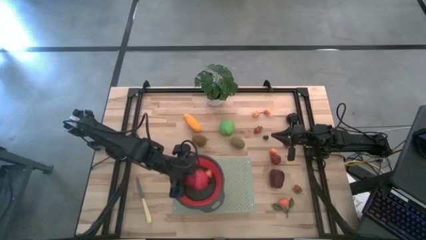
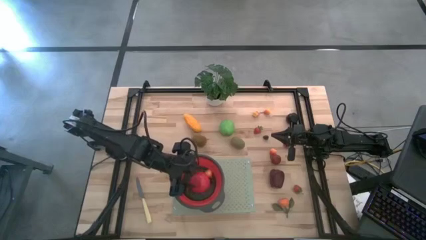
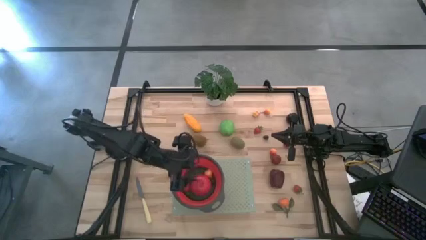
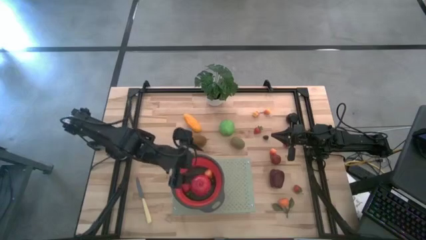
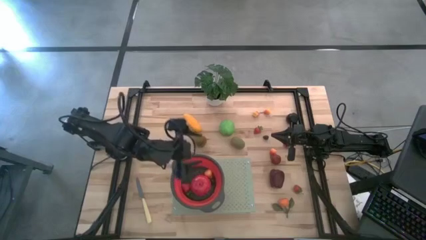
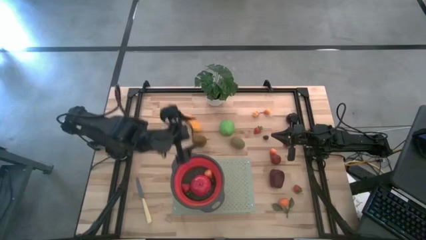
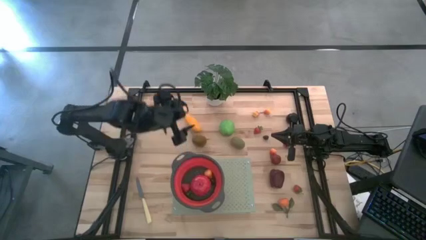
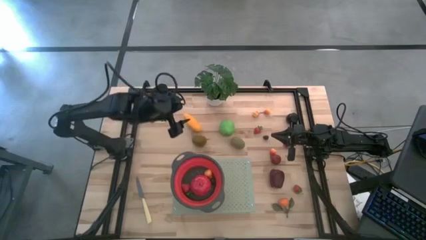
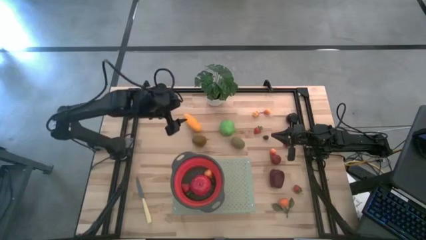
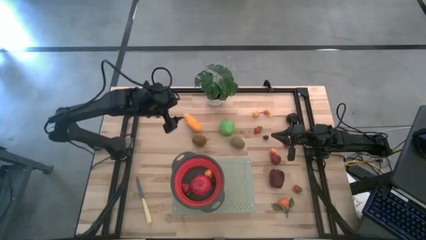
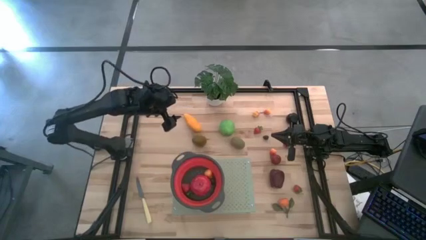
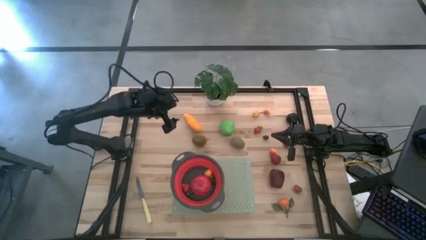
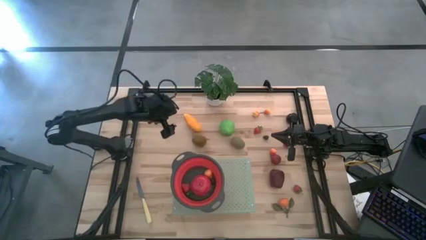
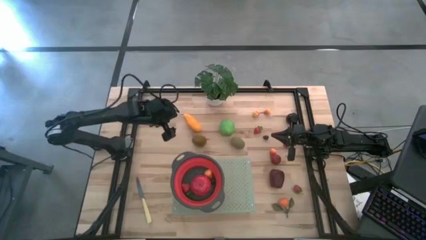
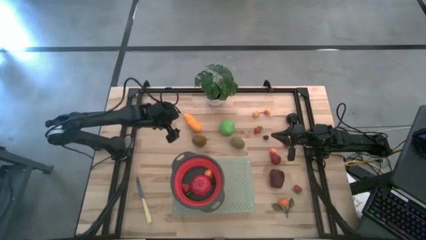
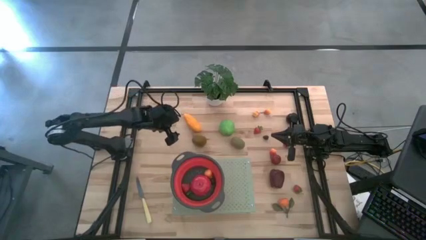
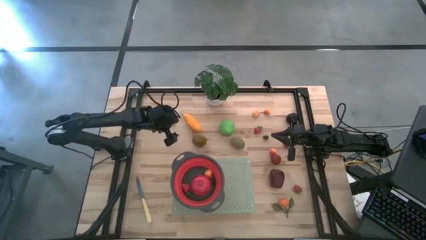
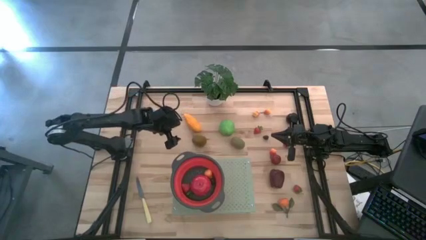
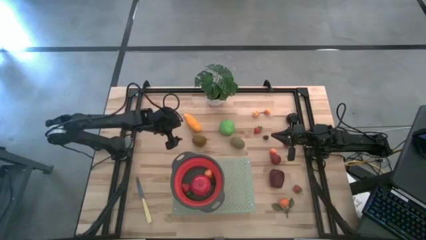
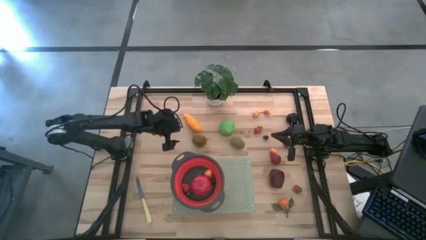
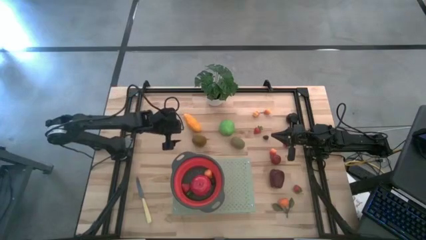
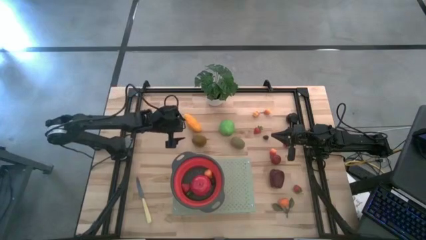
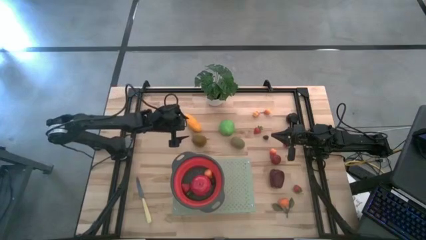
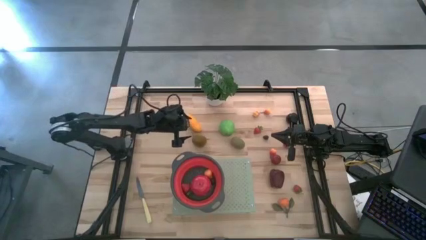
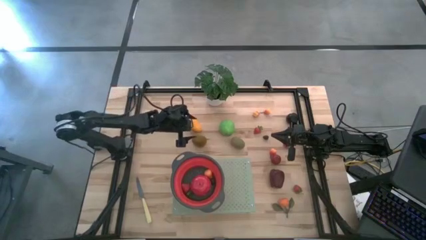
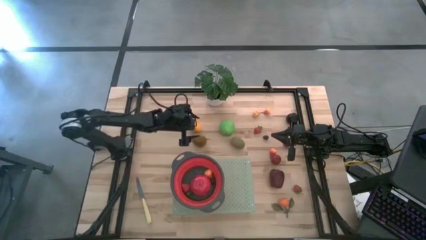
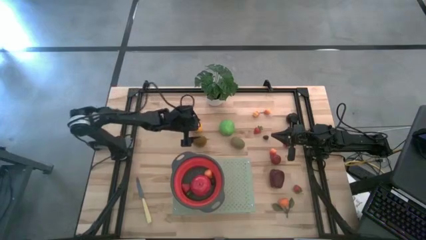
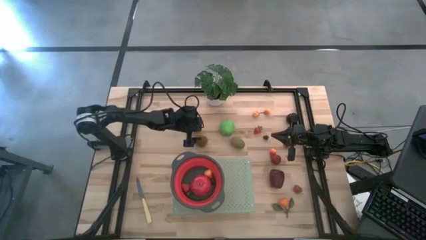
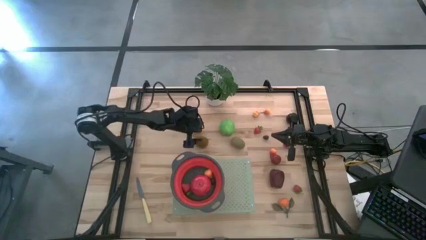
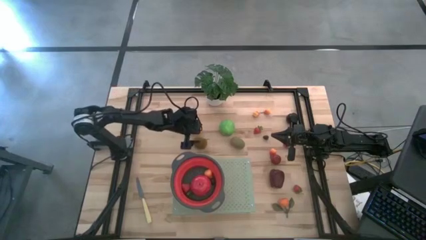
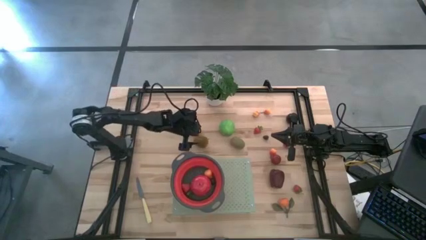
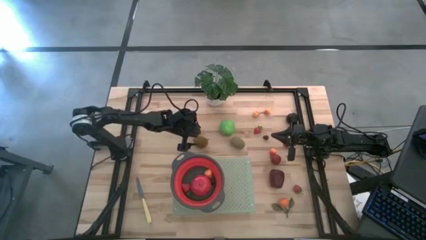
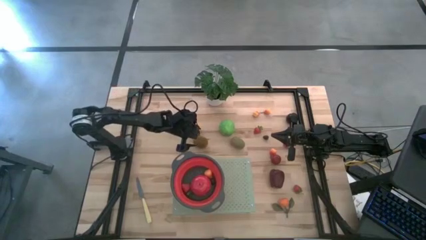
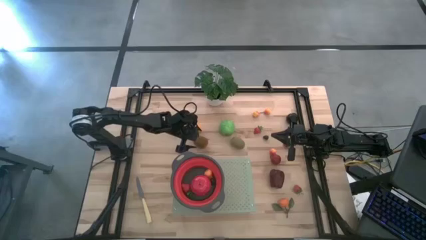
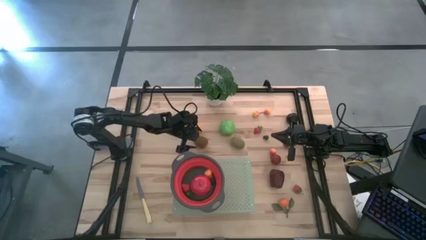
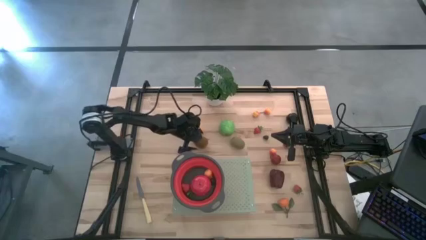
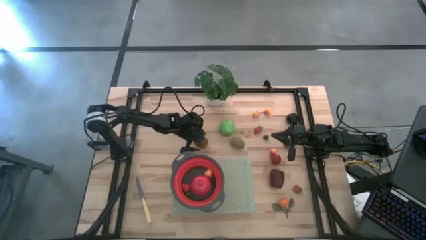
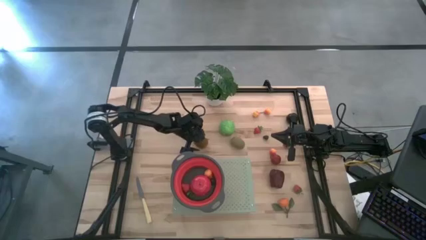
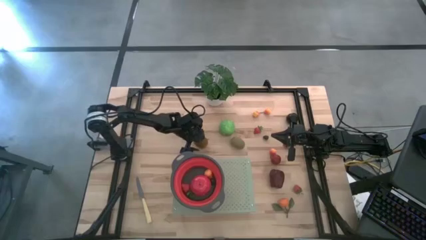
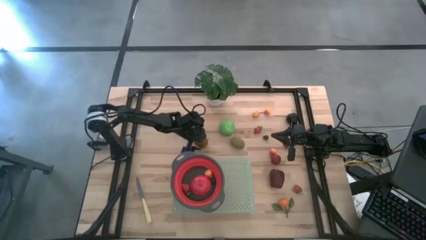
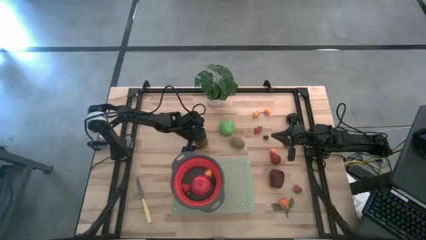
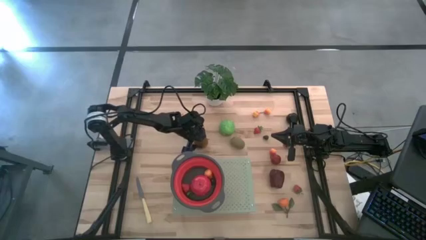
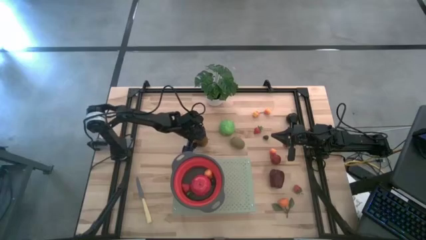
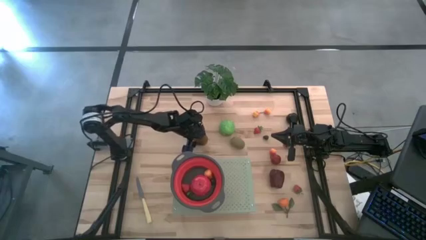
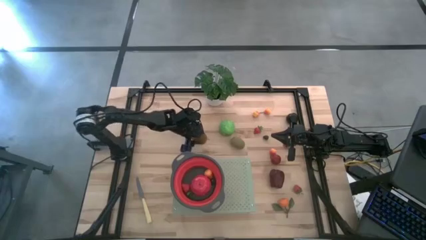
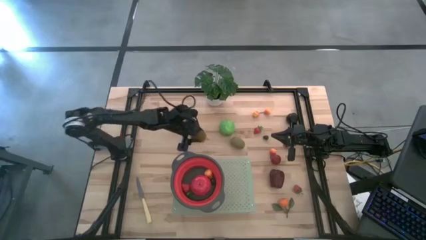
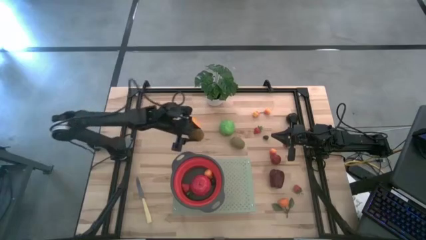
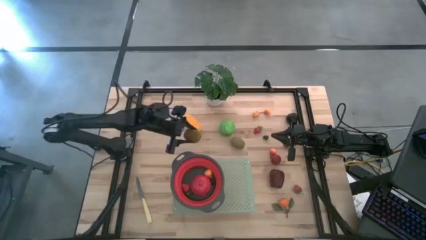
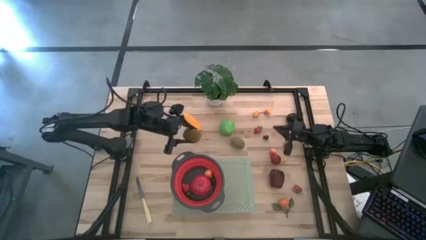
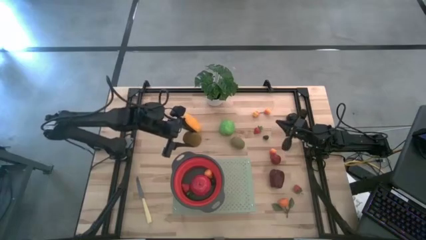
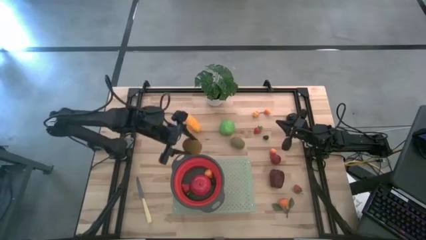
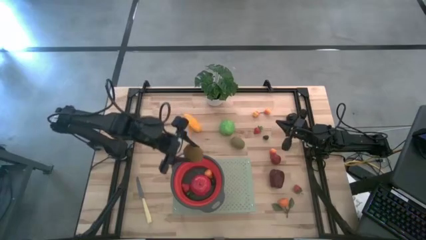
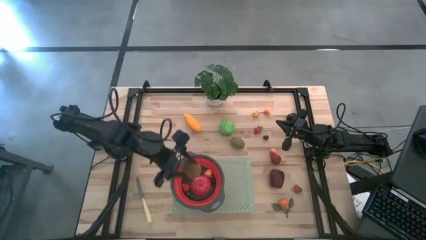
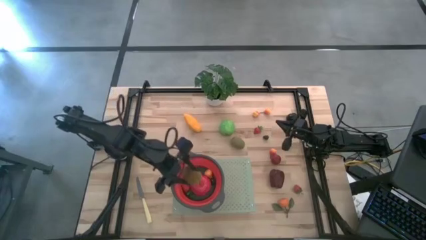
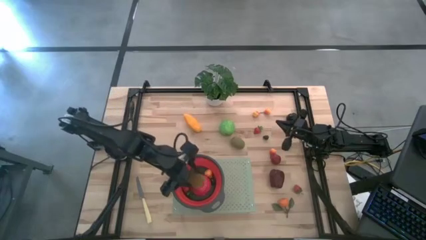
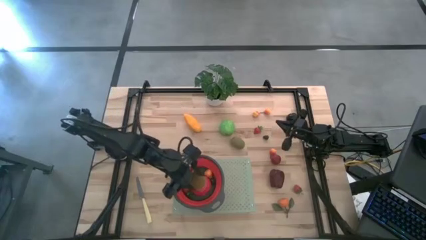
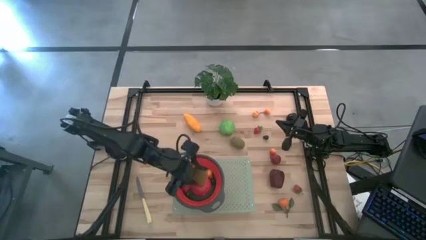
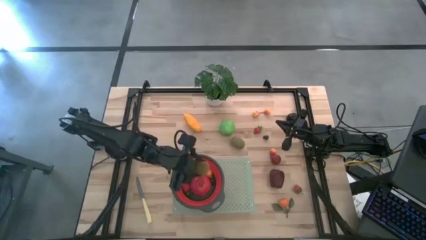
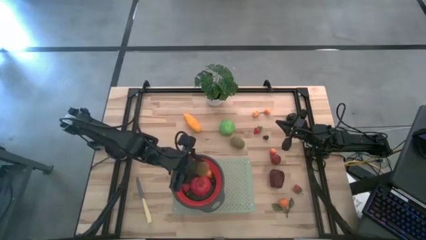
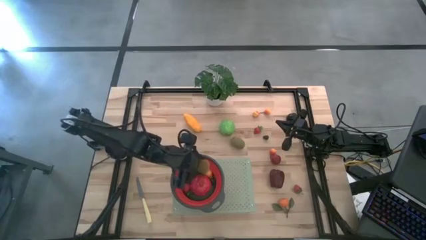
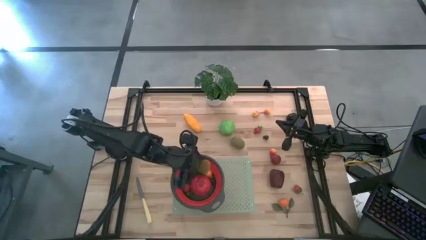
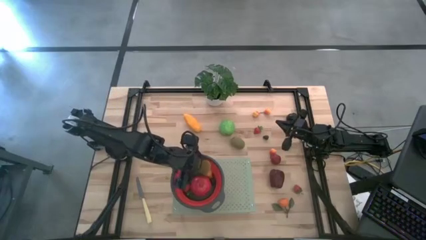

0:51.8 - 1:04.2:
Task: Pick & Place Fruit
Put the kiwi into the red strainer

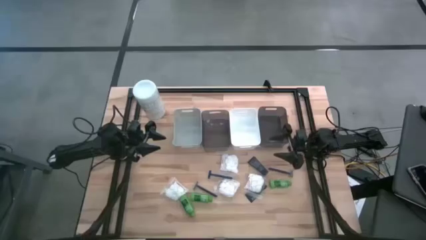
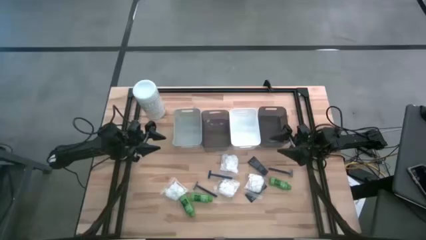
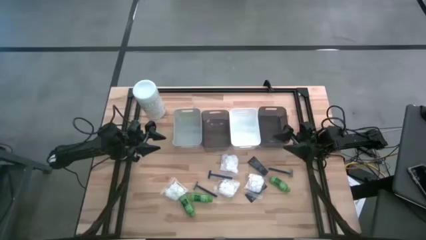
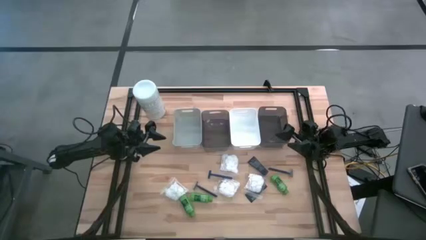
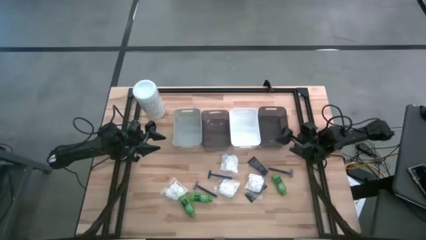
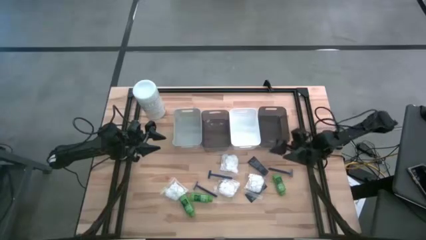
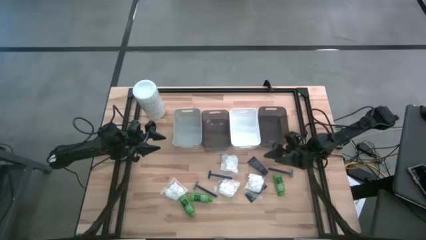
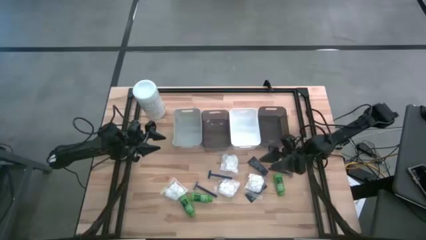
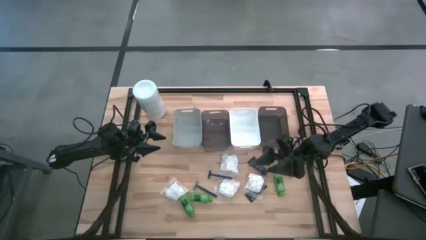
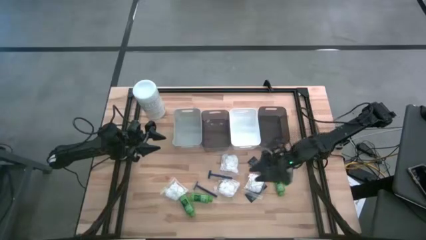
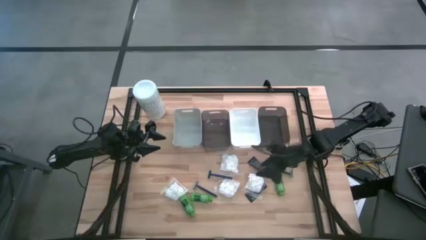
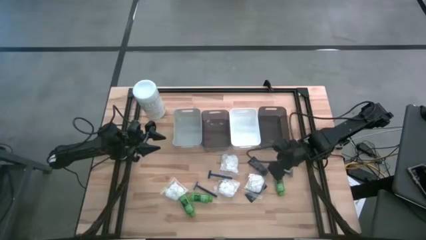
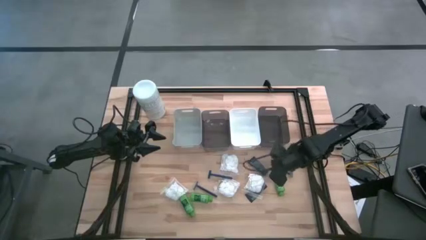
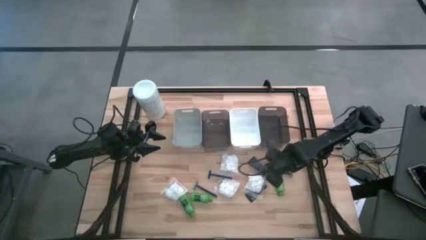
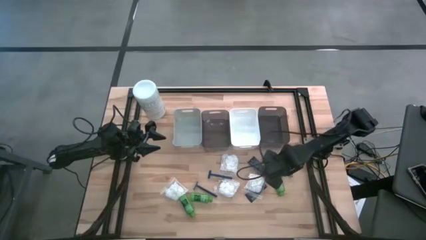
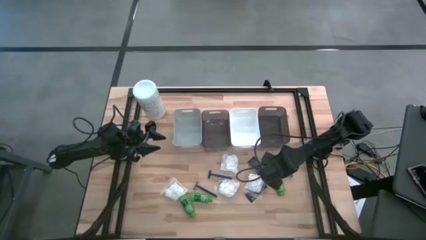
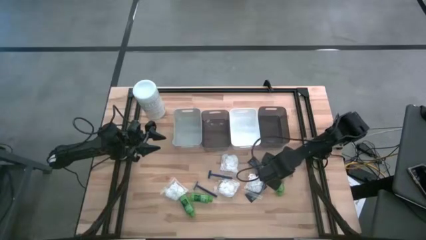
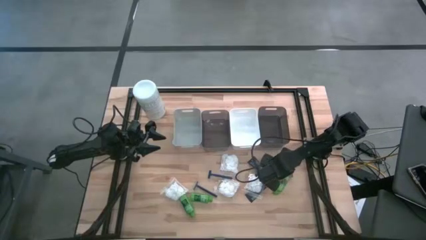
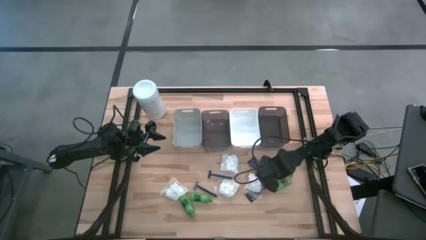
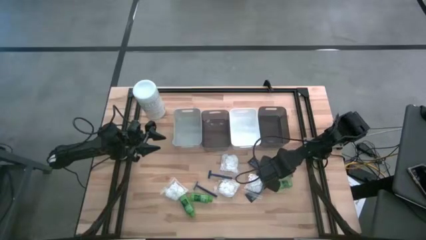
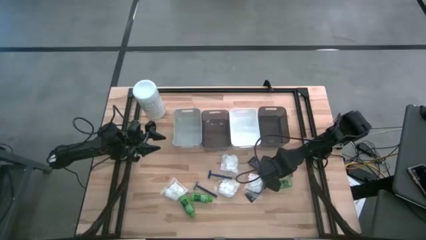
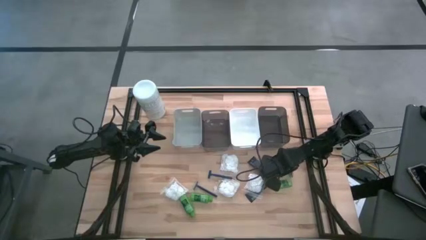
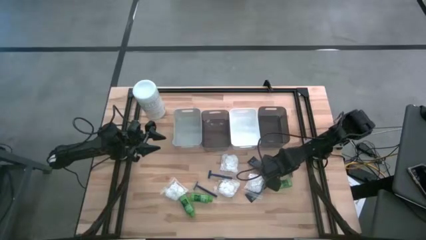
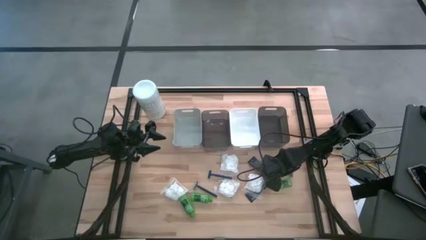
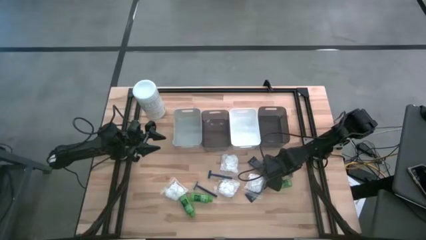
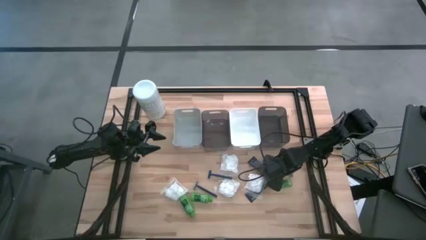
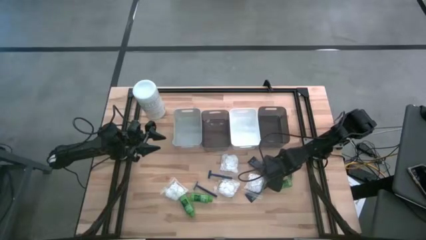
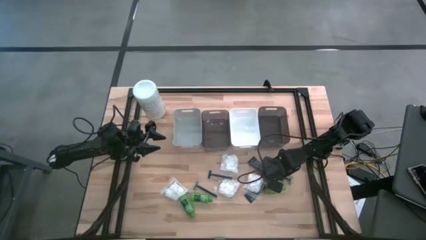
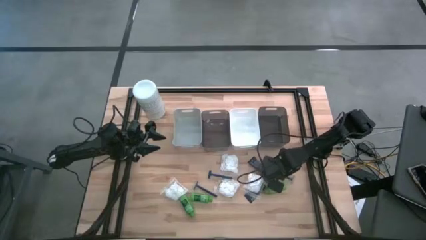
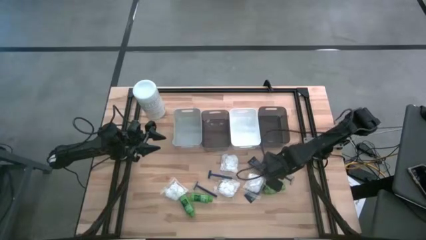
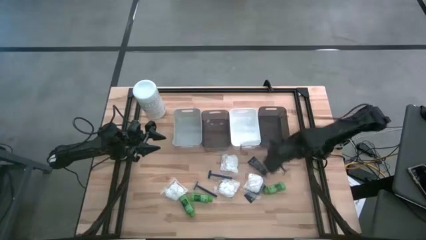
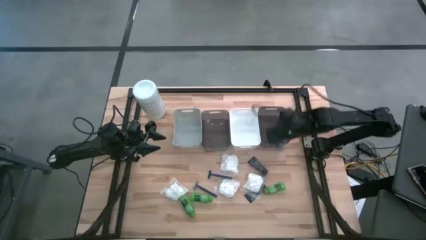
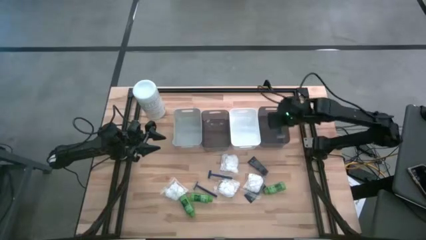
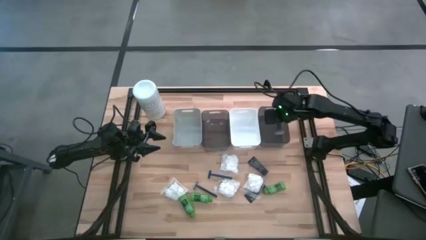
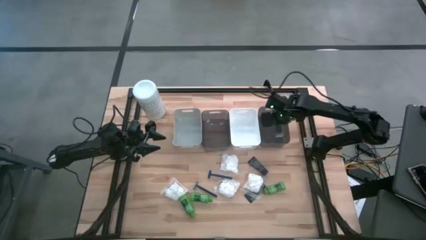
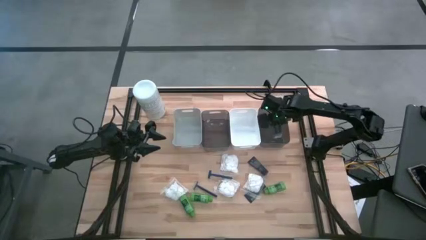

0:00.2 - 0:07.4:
Task: Pick & Place Travel size toiletries
Put the top right blue razor into the right black bin
